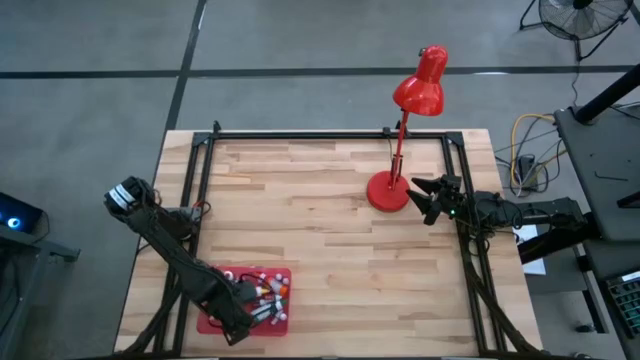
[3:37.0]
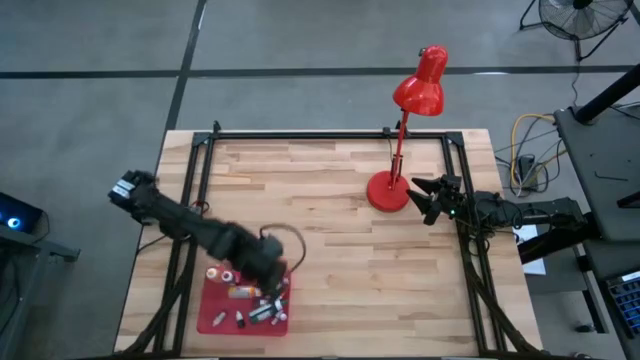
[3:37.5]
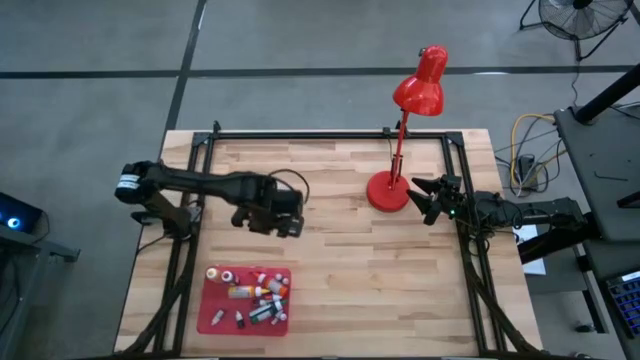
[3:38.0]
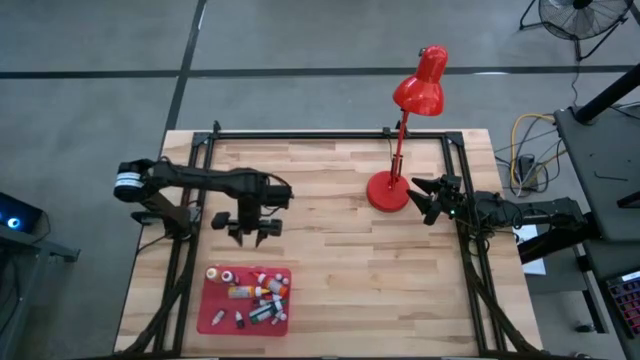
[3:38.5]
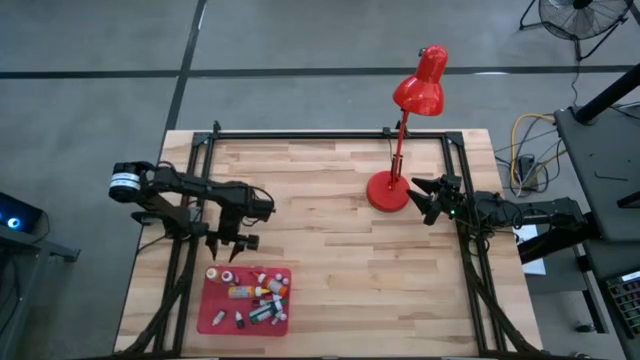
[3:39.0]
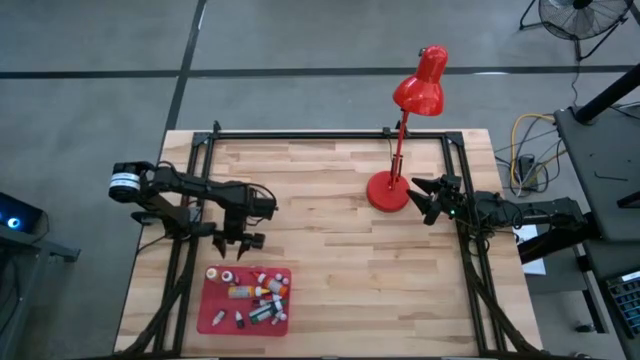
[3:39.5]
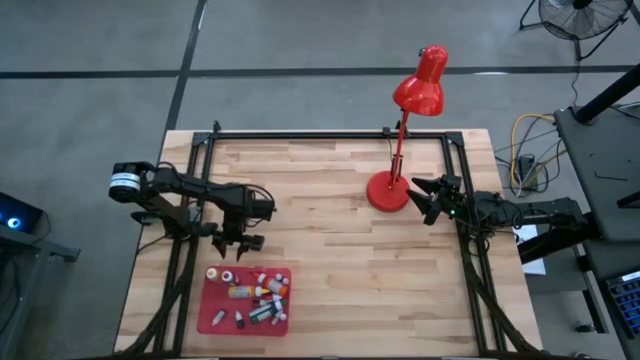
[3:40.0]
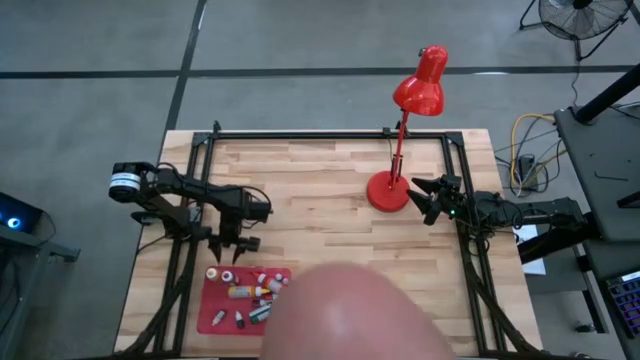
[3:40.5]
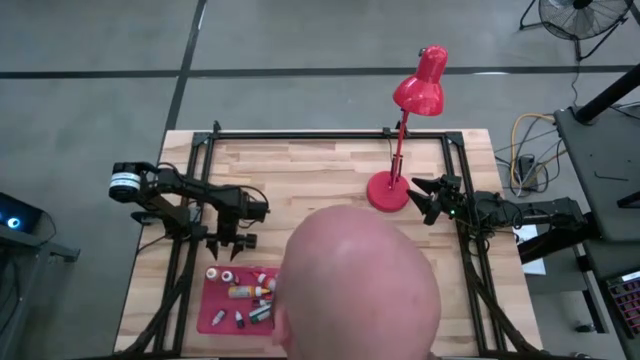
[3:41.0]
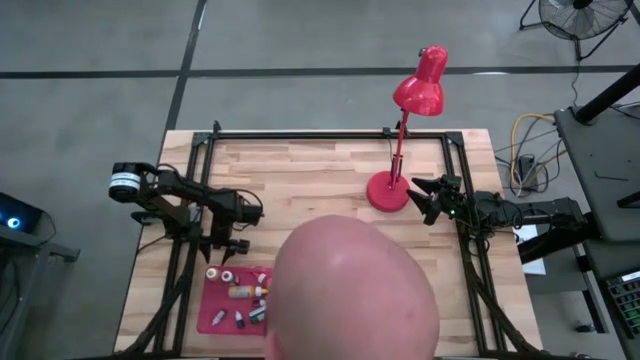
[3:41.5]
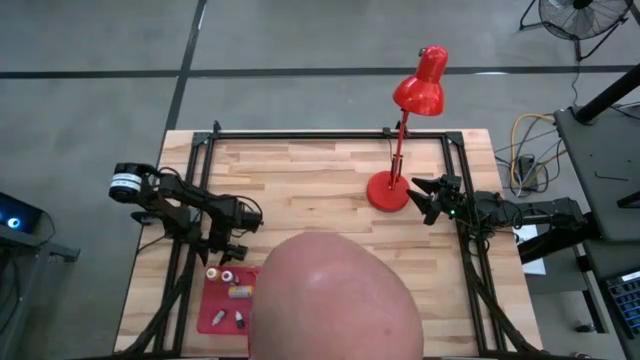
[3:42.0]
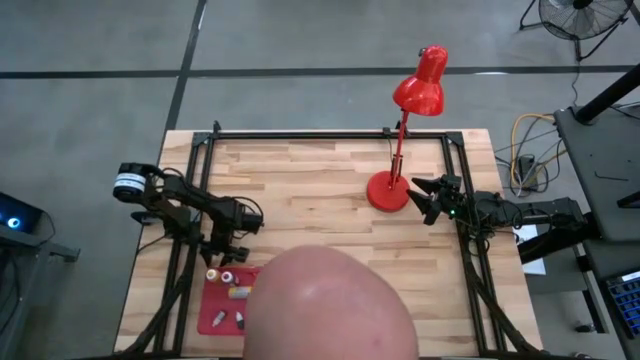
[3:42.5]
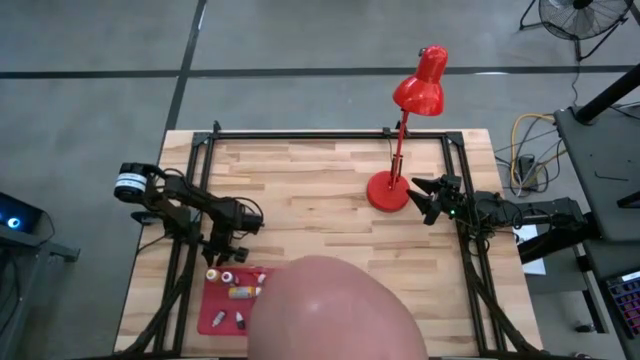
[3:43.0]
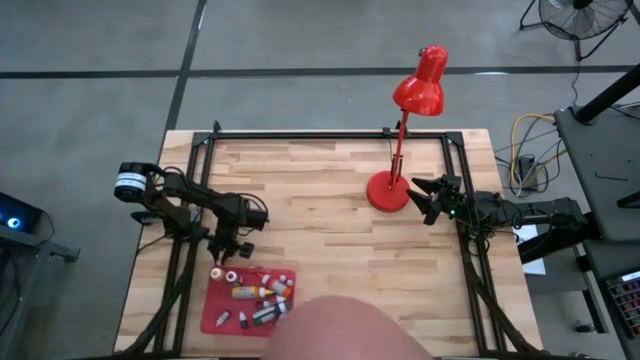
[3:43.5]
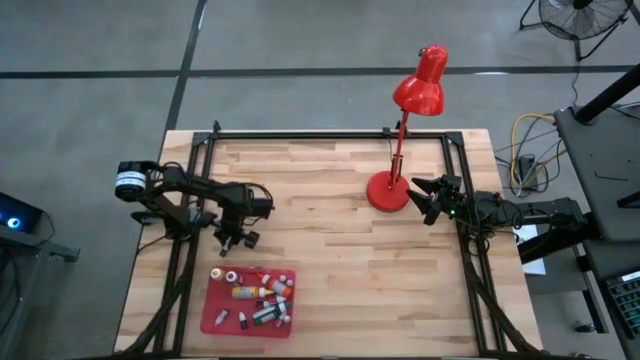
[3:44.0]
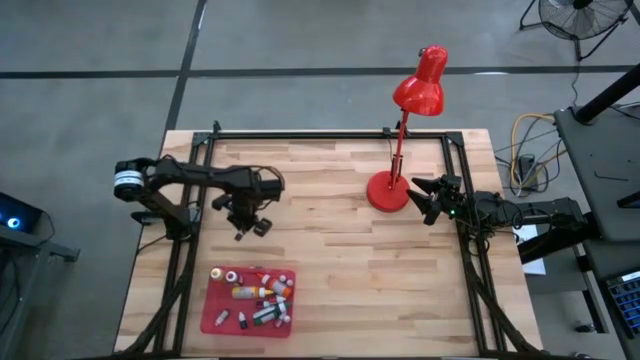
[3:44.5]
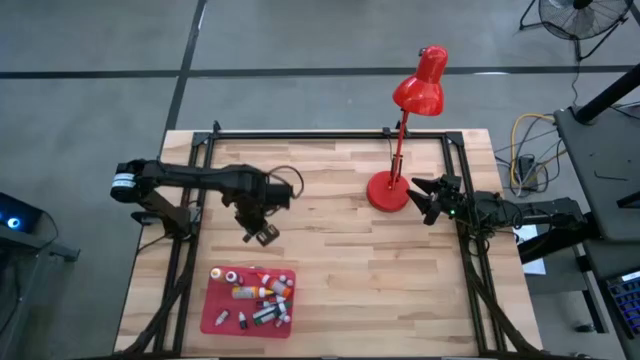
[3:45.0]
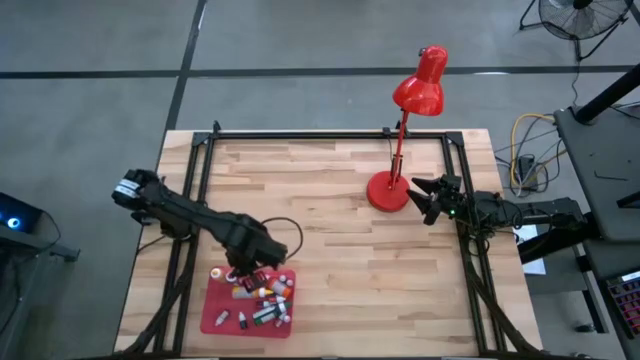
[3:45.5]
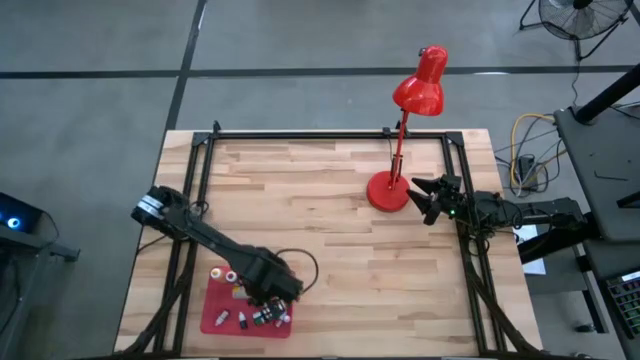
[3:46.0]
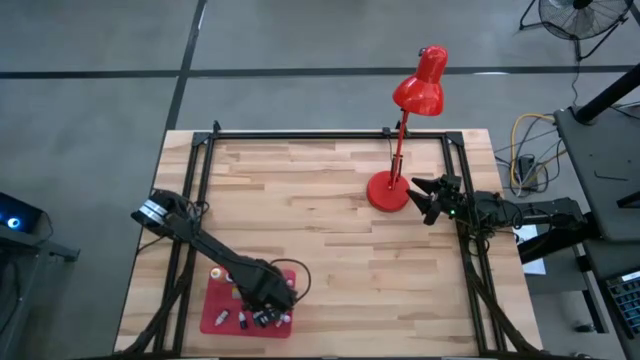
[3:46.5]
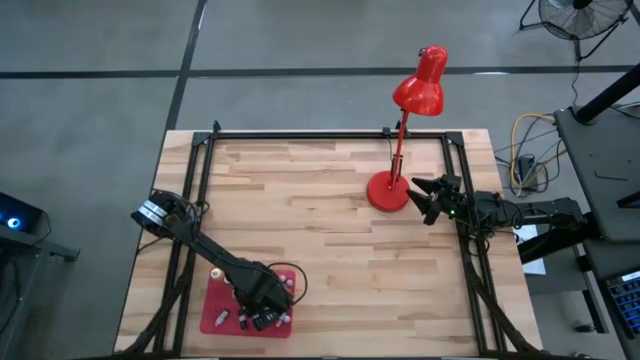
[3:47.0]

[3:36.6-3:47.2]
Task: Pick & Place food coloring
Put the small black food coloring bottle into the red bin

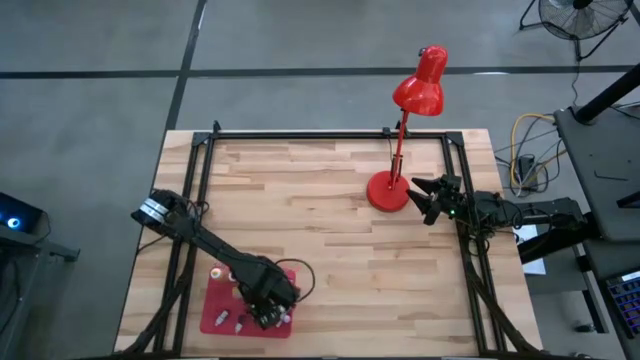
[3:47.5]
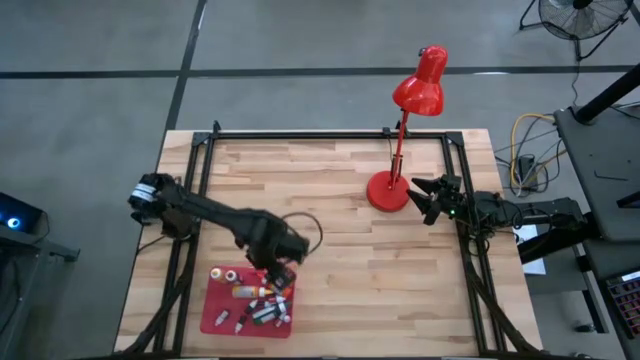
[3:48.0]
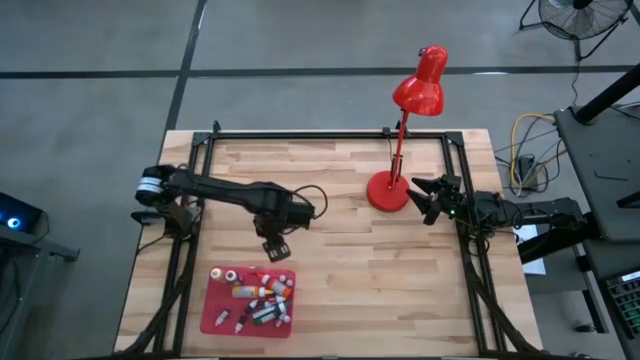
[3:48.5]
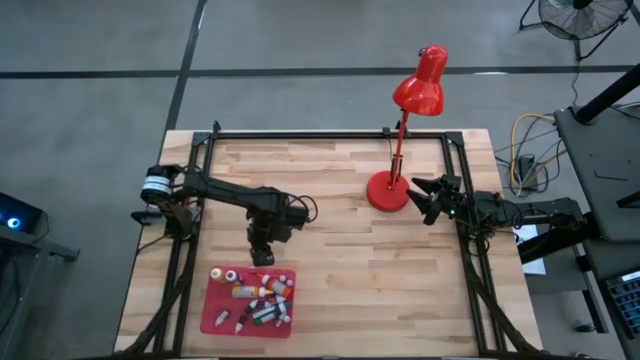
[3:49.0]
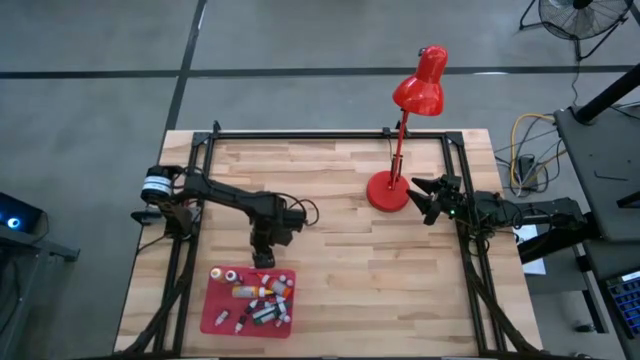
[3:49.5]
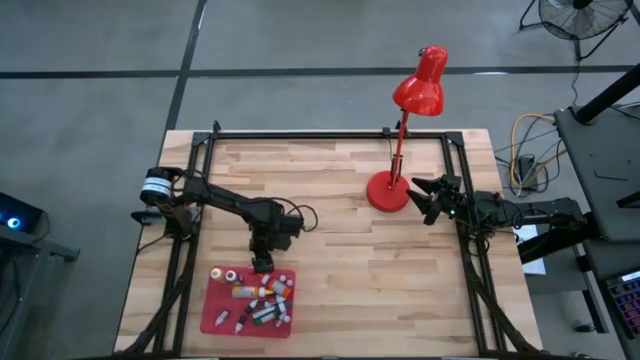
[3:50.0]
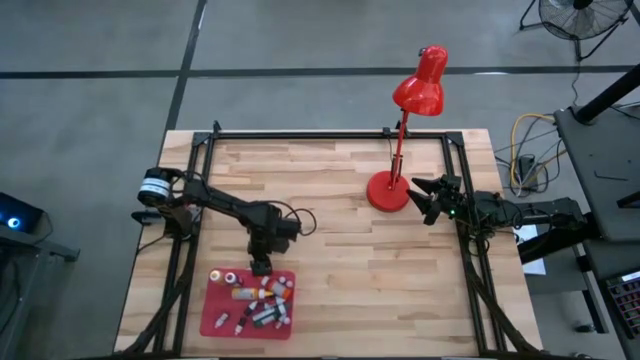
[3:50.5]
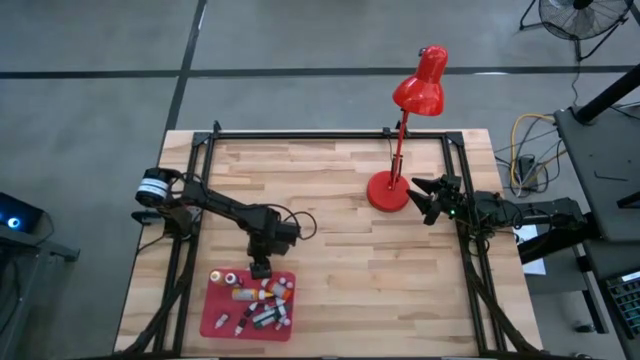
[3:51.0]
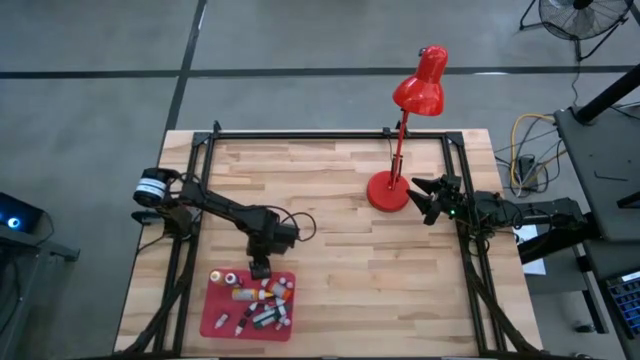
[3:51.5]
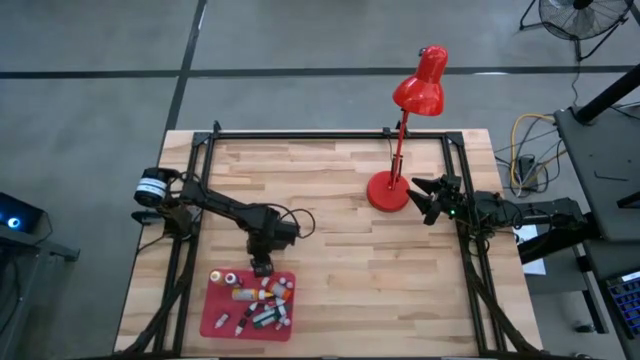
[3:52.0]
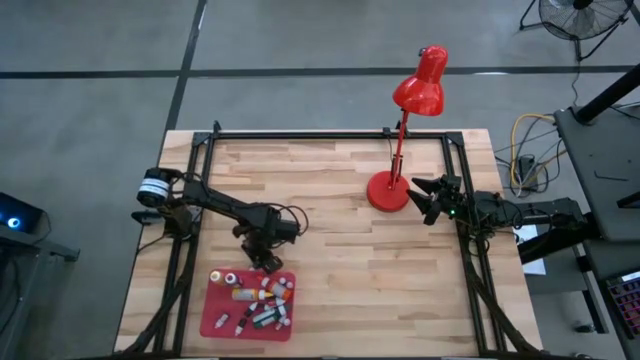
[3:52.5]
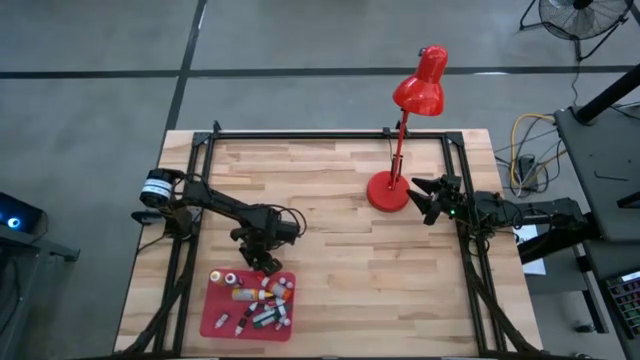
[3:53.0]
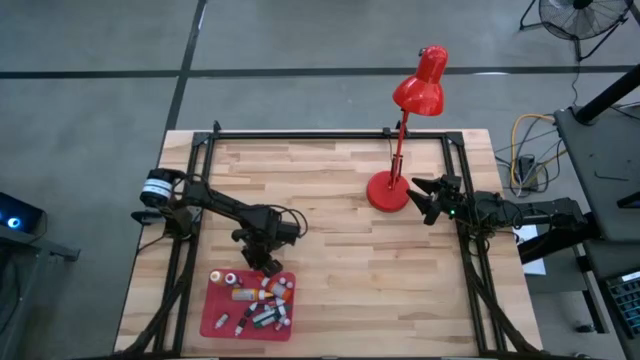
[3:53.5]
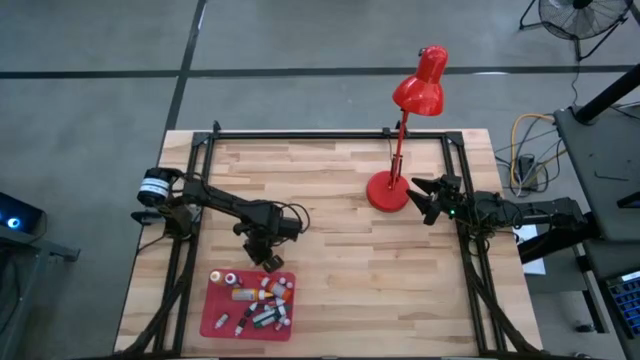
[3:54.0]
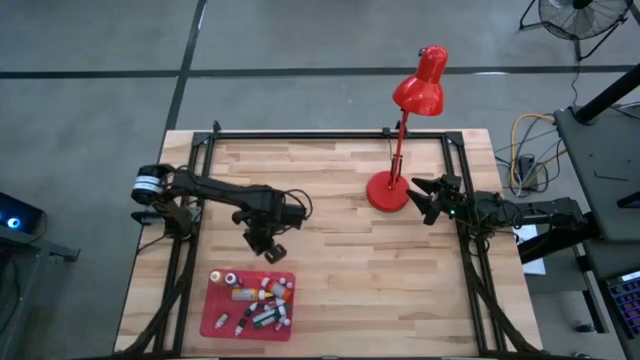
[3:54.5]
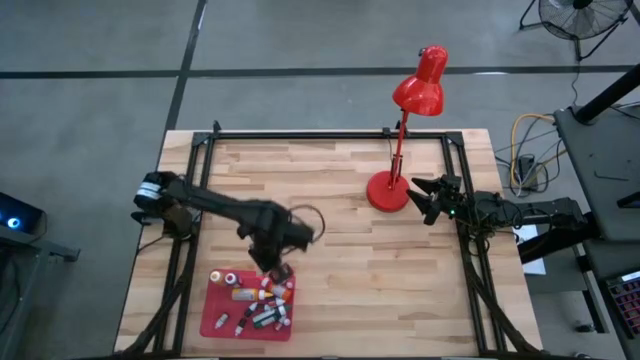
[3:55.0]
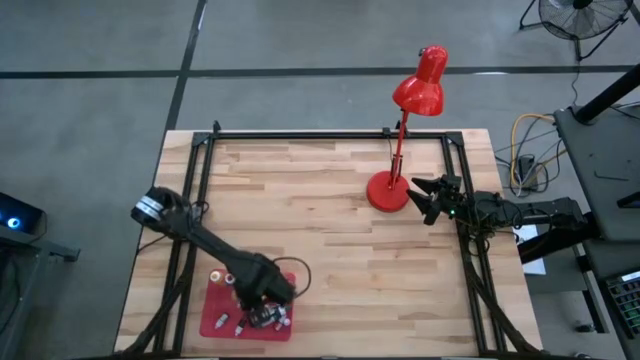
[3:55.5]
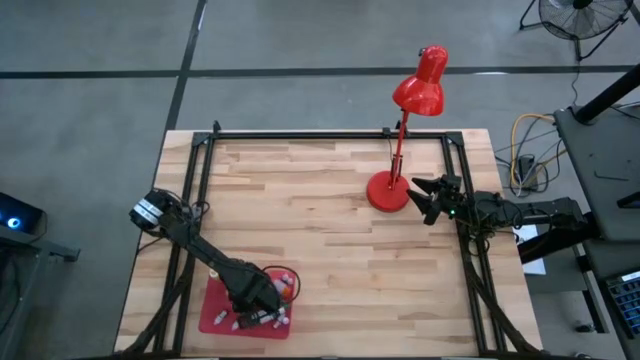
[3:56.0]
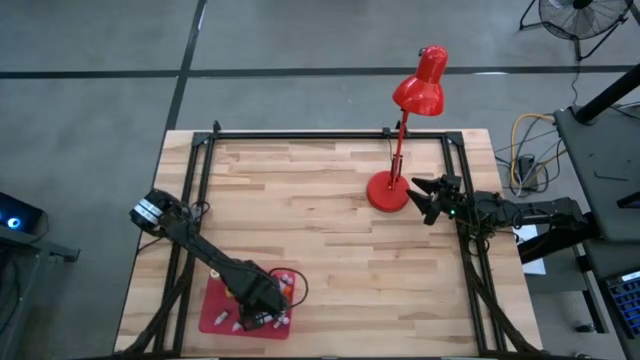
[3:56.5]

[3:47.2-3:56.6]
Put the small blue food coloring bottle into the red bin

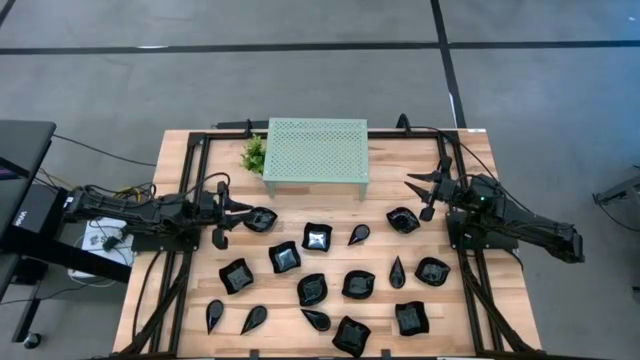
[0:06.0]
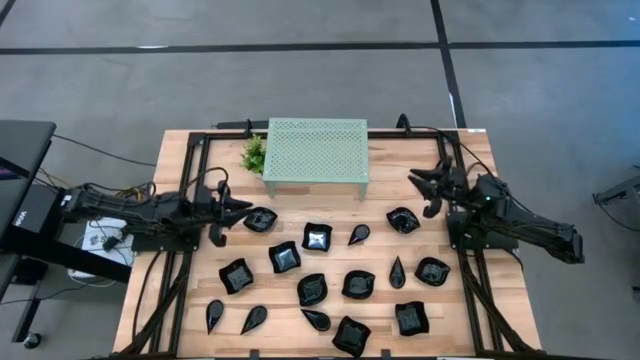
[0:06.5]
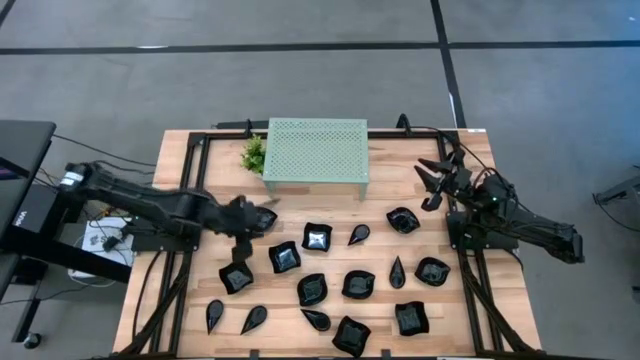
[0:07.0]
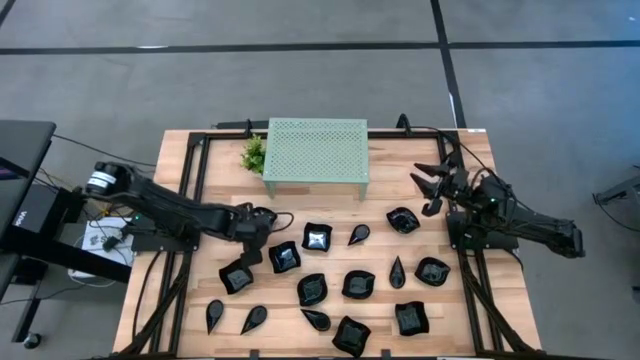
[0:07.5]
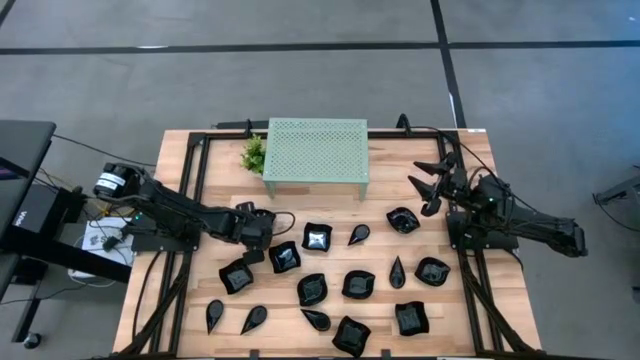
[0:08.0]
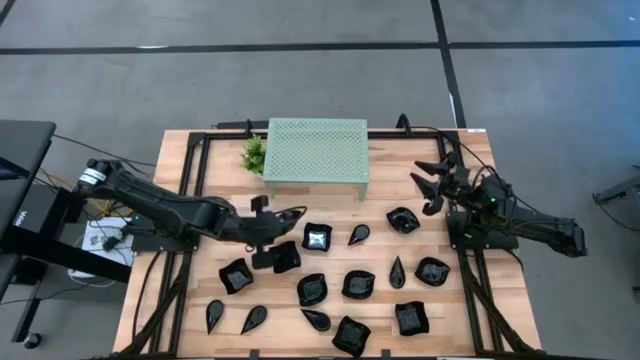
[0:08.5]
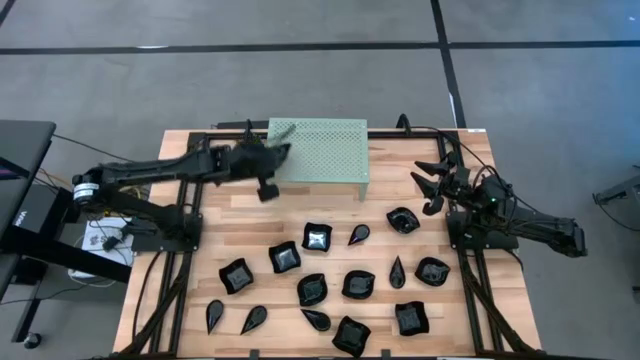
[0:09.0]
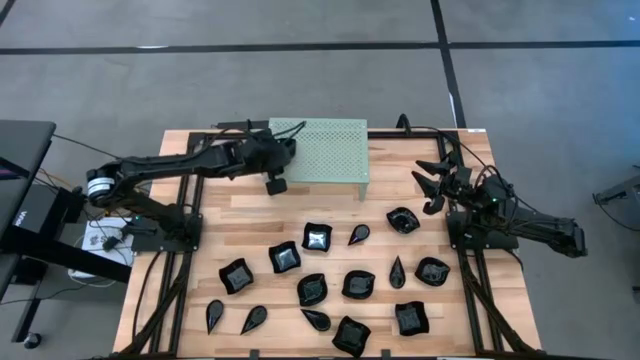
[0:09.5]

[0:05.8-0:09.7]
Task: Pick & Place Mini shaped plates
Put the leaf-shaped plate on the shelf
